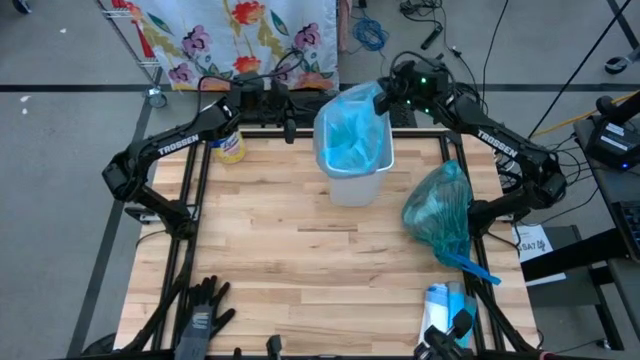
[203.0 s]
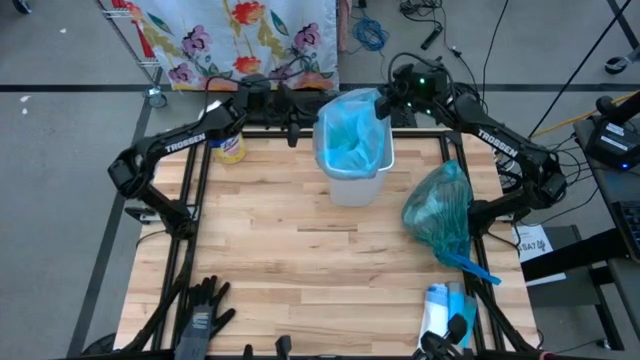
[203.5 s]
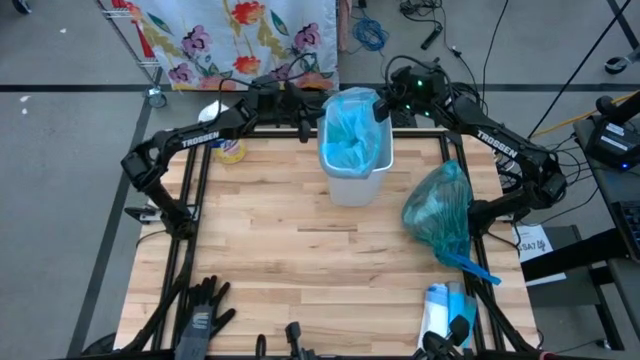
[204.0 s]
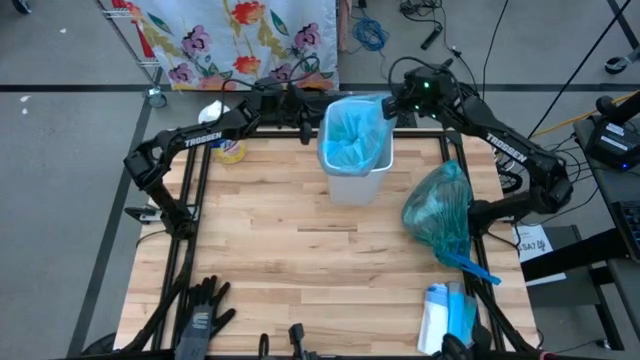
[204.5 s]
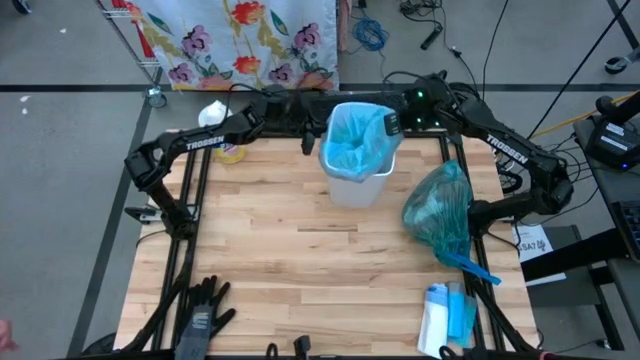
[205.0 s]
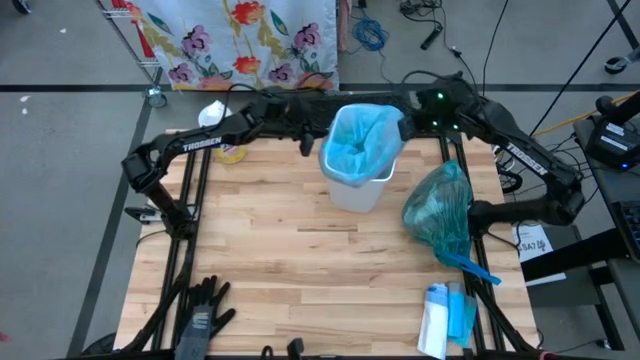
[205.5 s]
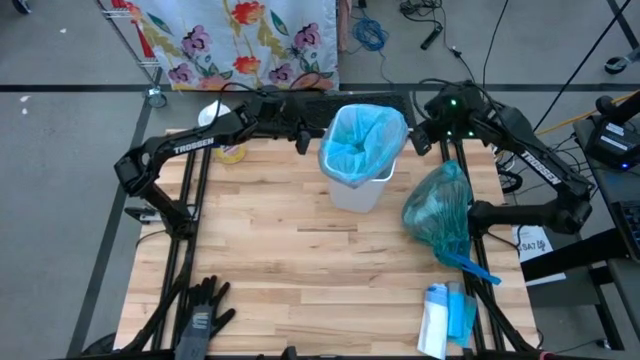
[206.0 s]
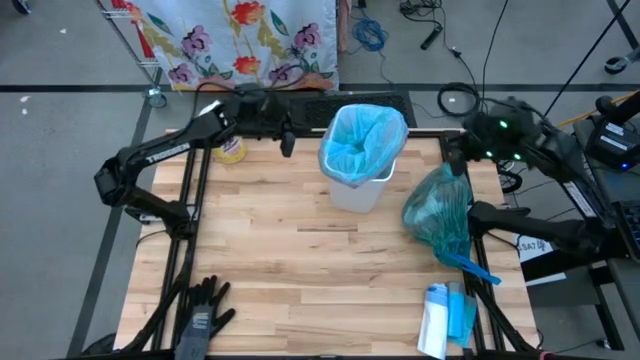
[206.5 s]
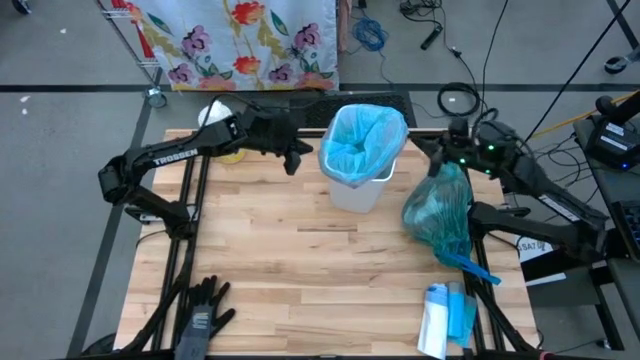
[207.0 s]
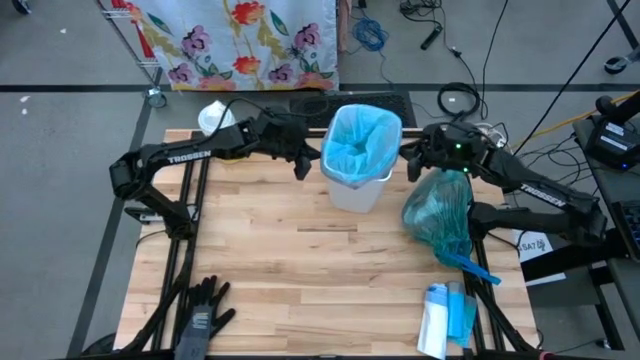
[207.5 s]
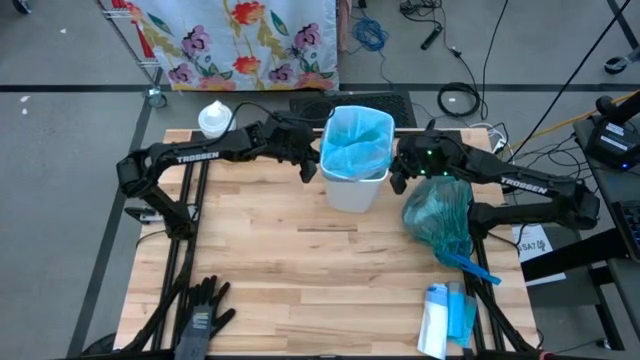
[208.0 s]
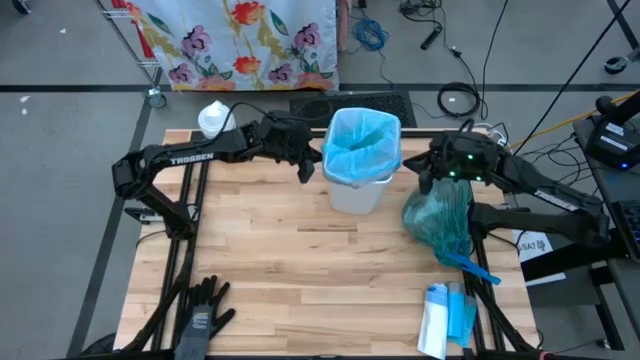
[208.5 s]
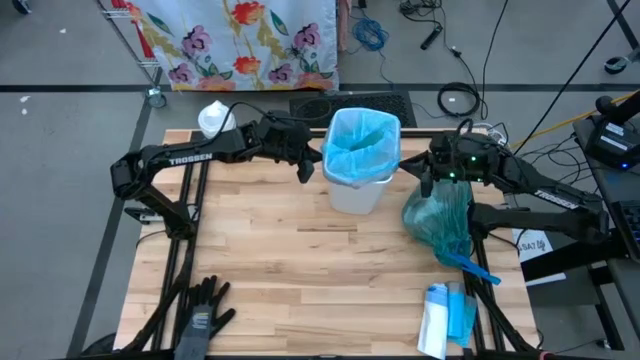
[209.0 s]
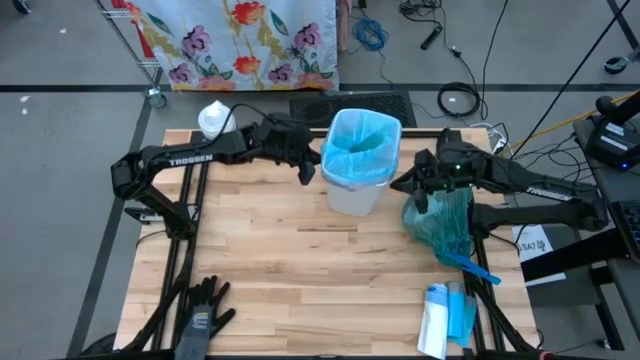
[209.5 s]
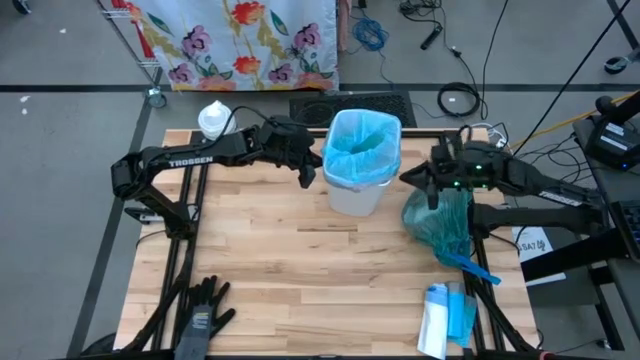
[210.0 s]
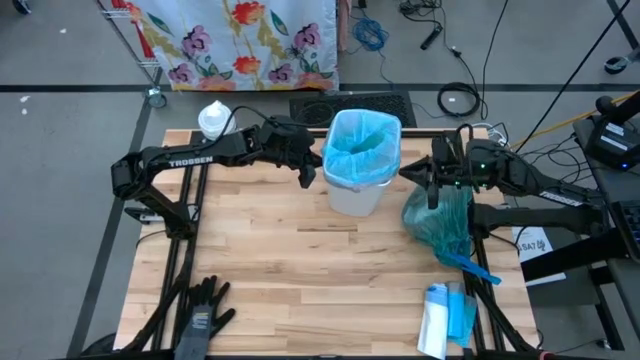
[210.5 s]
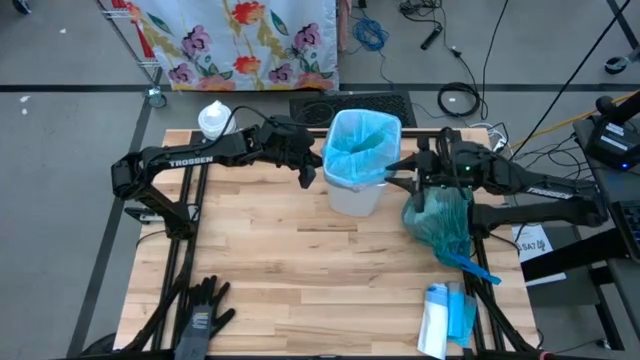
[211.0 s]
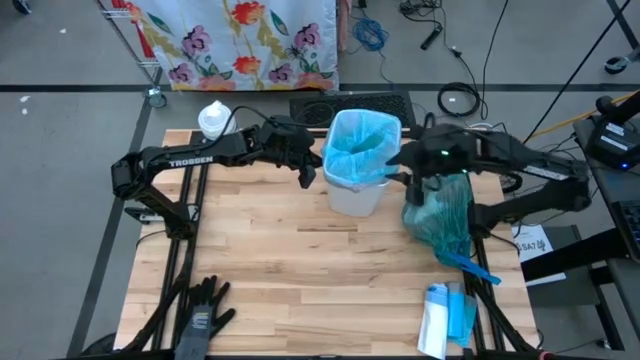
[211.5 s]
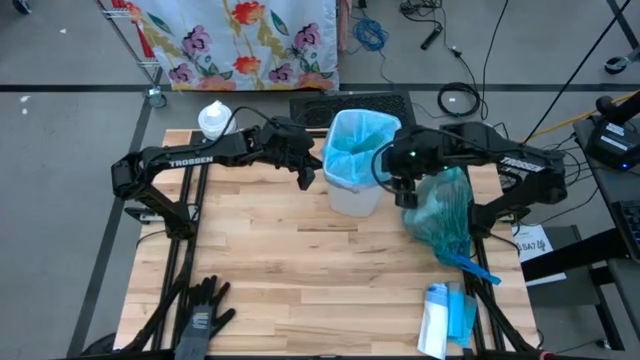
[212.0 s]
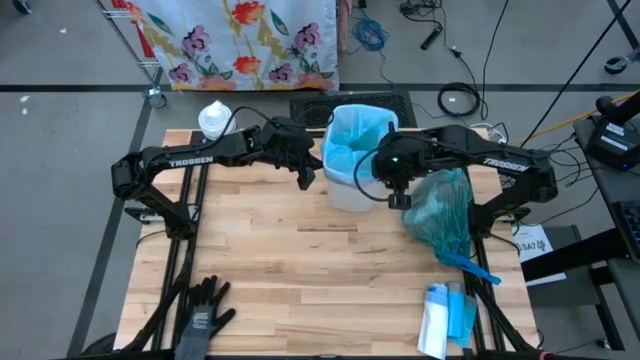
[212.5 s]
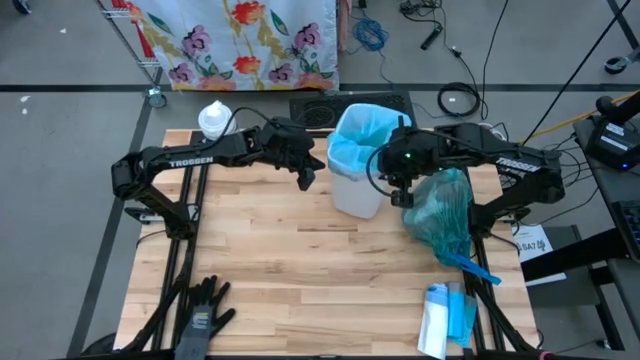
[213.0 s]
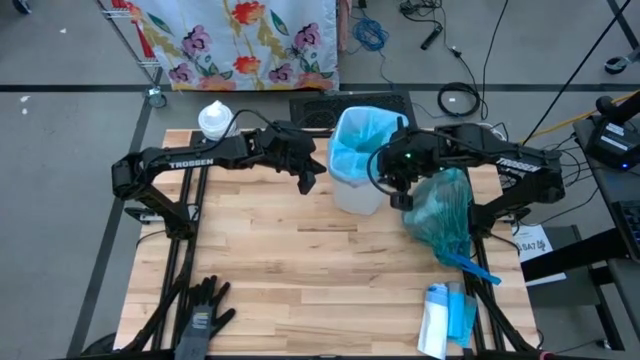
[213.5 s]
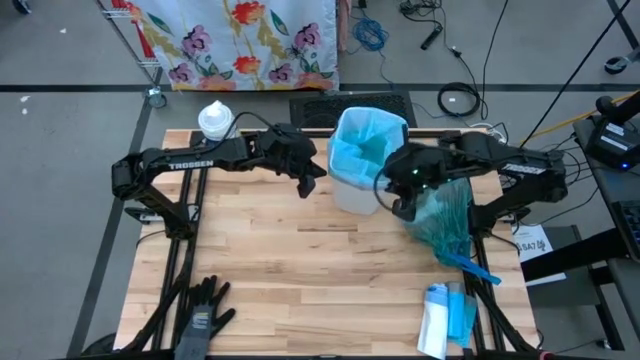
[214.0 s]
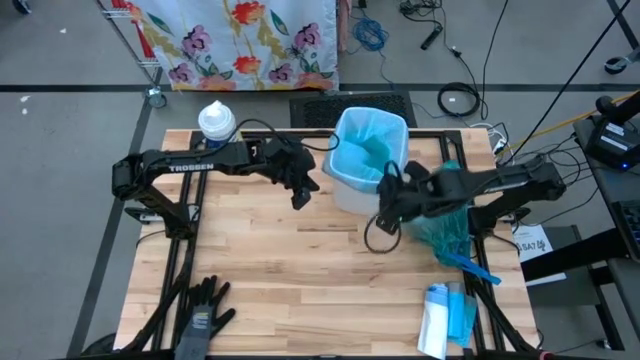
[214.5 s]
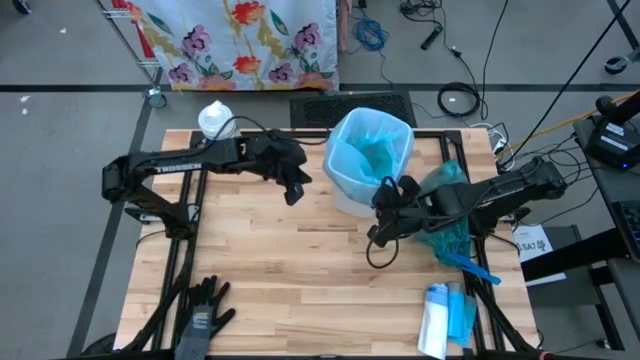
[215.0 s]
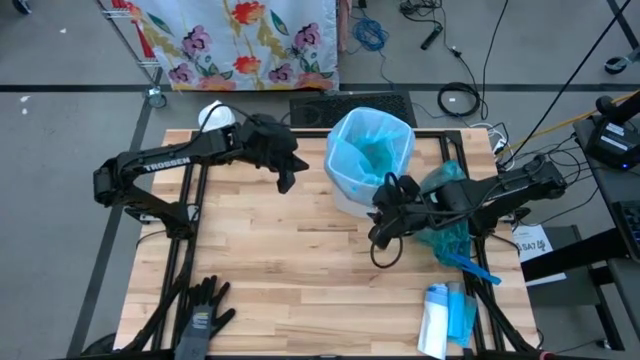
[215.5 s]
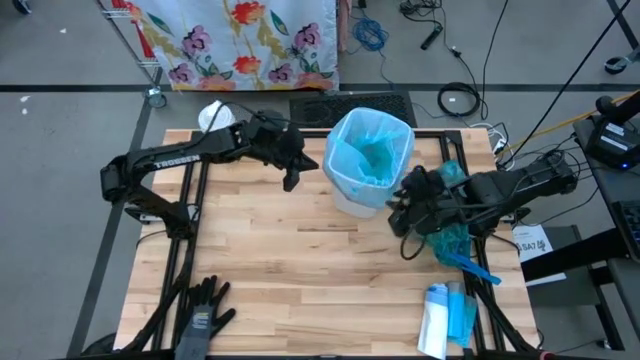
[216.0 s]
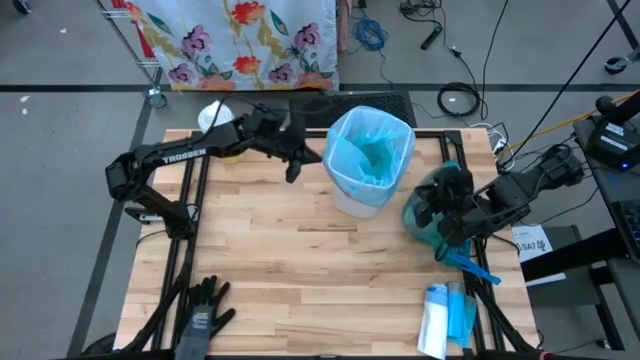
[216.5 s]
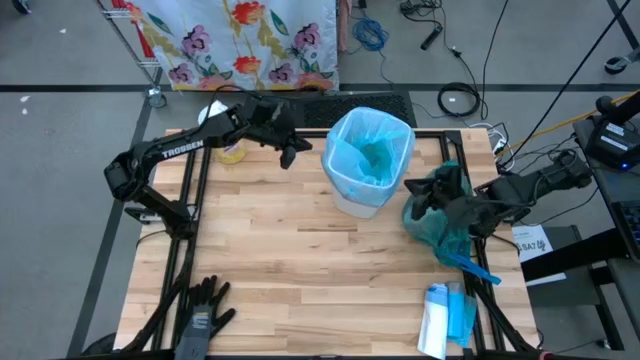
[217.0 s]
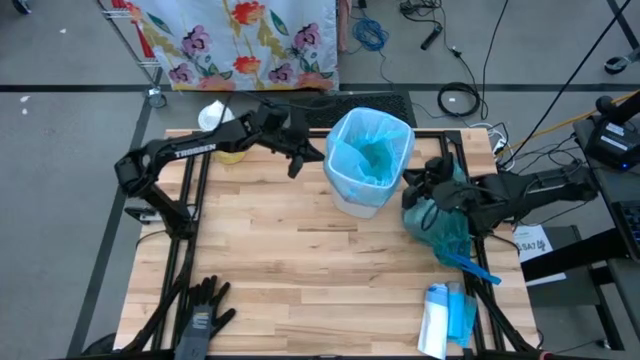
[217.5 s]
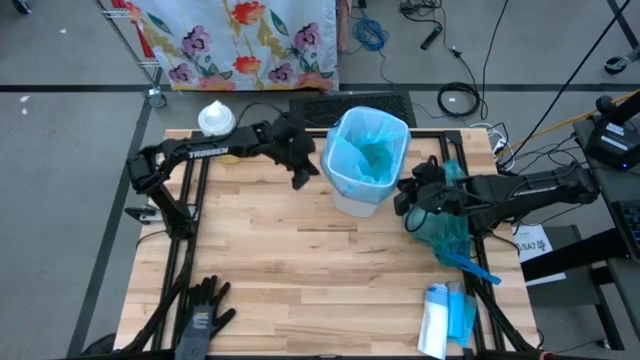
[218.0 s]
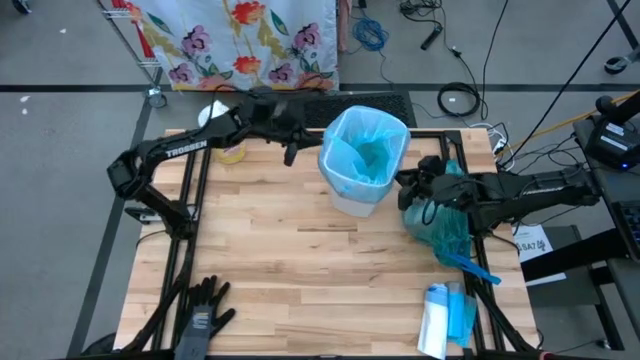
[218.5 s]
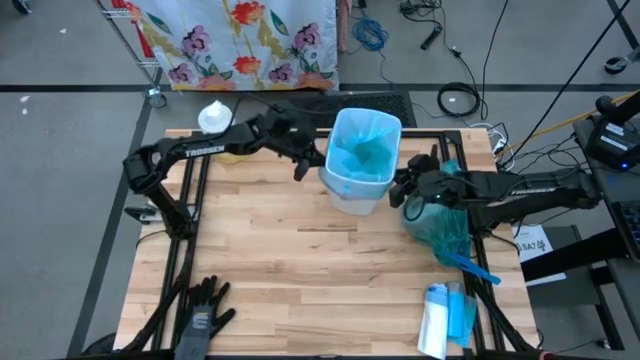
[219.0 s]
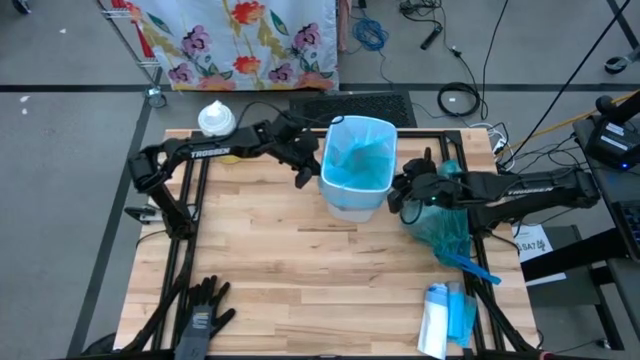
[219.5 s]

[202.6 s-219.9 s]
Task: place trash/remove bag and relplace
Insert a new trash bag into the trash bin

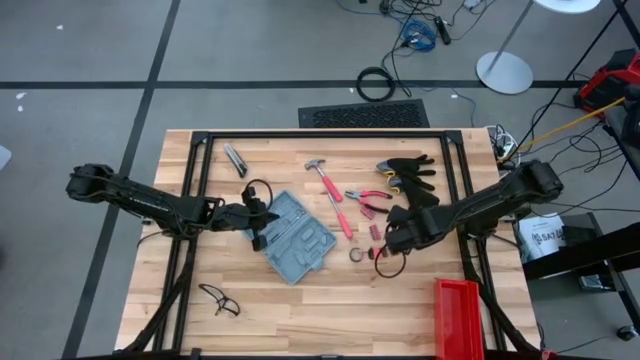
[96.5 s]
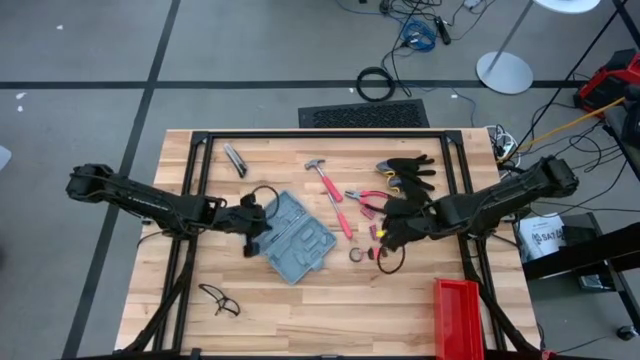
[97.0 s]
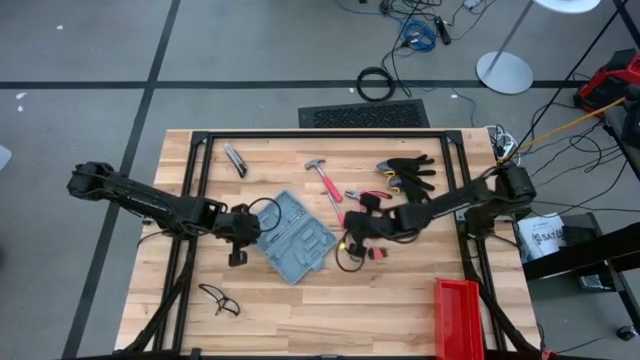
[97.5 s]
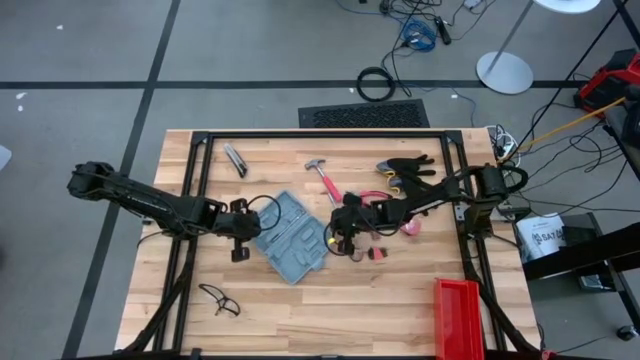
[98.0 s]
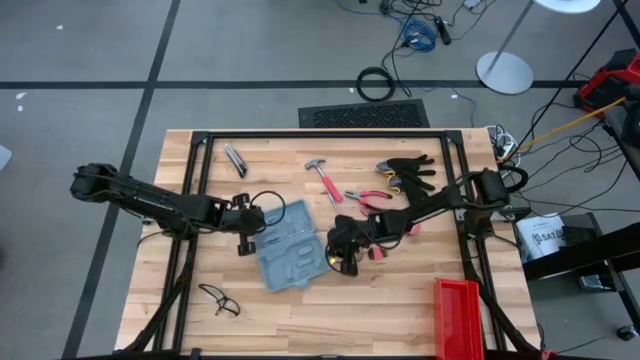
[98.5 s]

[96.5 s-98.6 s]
Task: prefit tool cases
Adjust the gray prefit tool case
